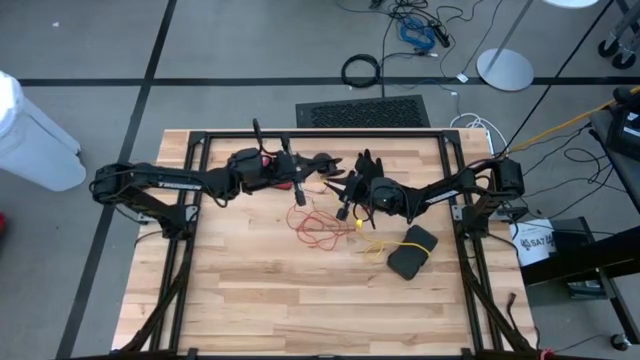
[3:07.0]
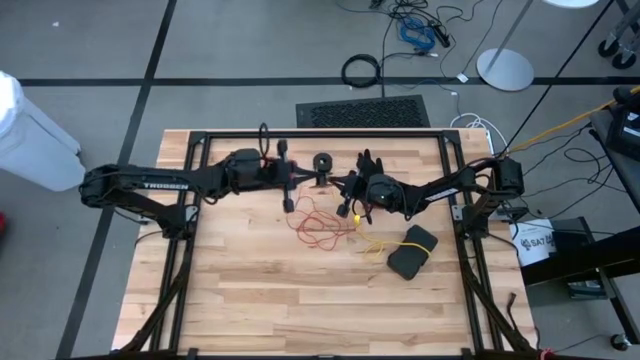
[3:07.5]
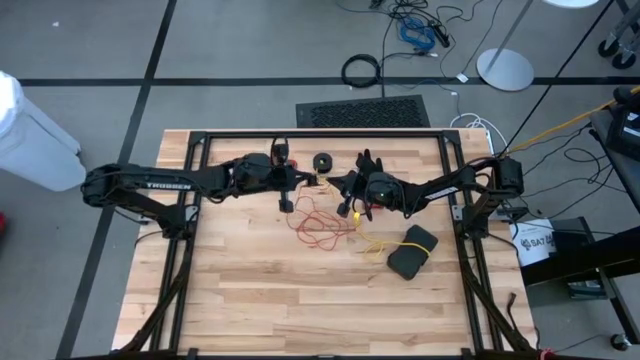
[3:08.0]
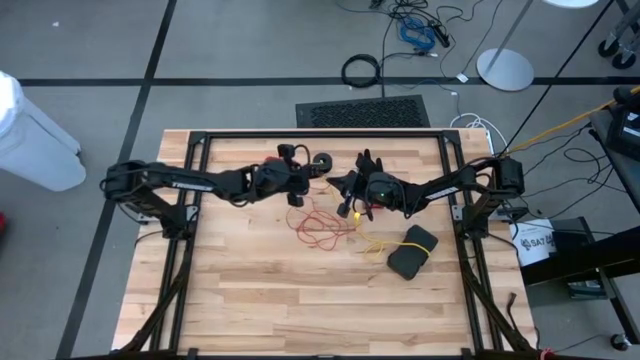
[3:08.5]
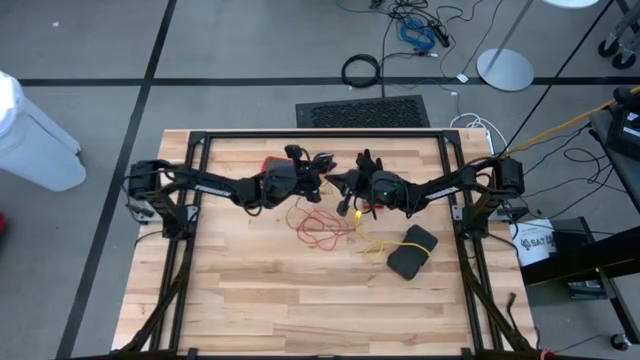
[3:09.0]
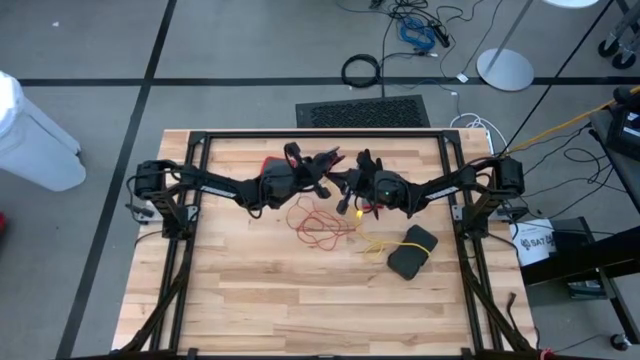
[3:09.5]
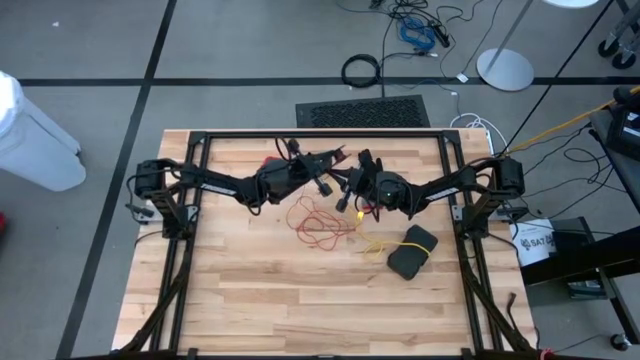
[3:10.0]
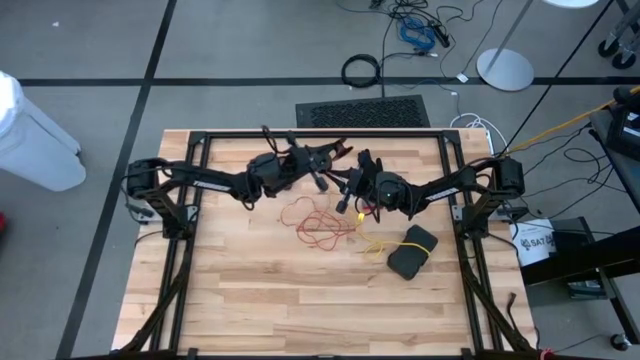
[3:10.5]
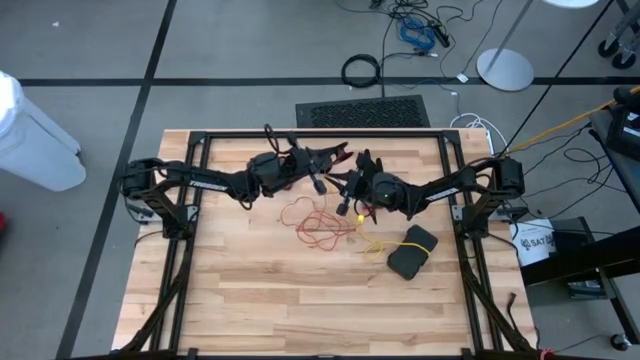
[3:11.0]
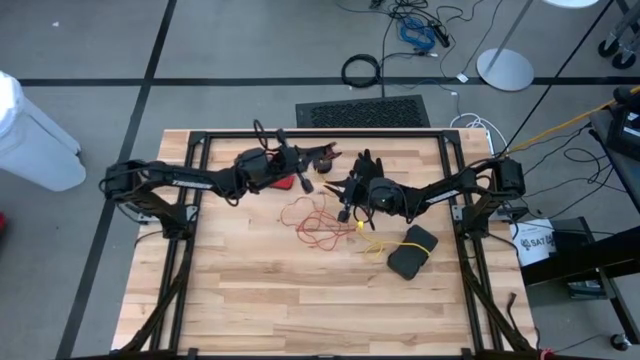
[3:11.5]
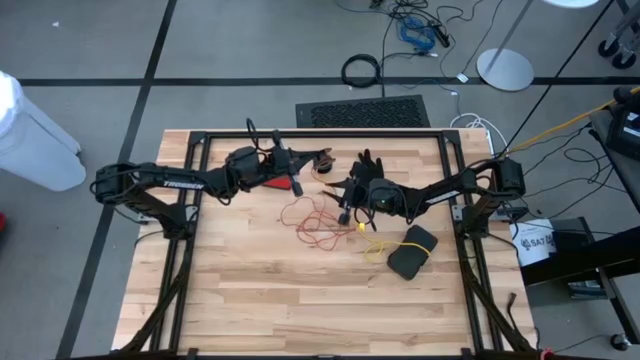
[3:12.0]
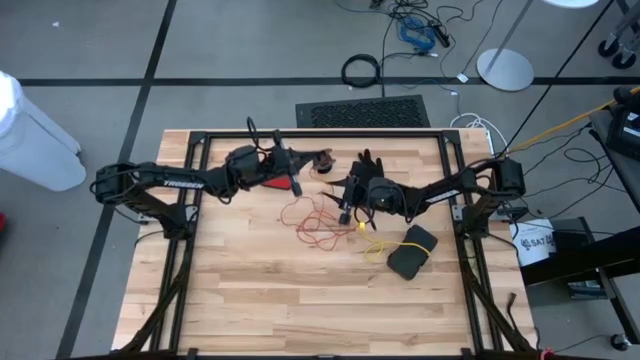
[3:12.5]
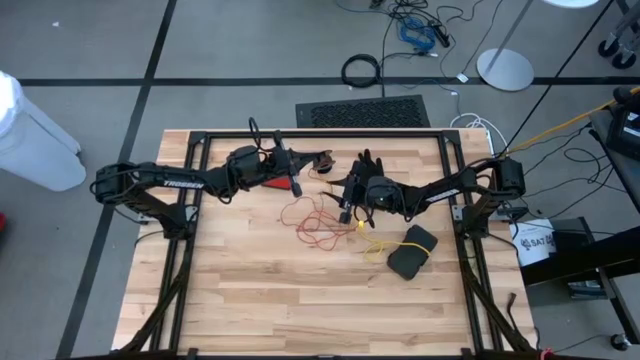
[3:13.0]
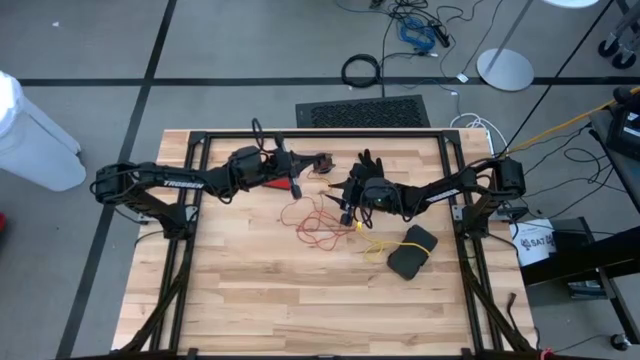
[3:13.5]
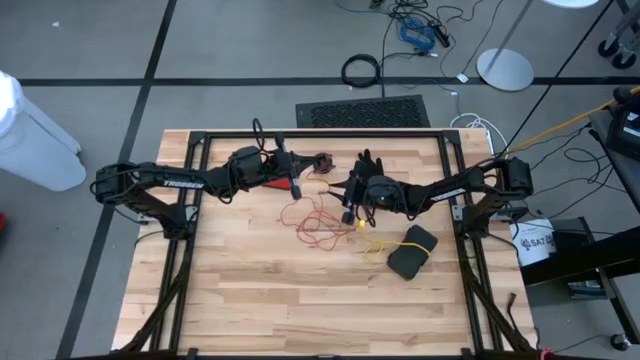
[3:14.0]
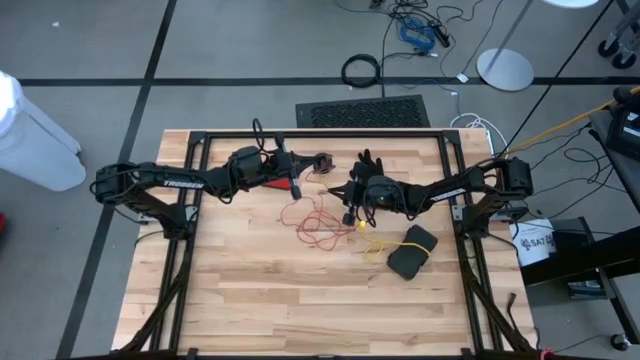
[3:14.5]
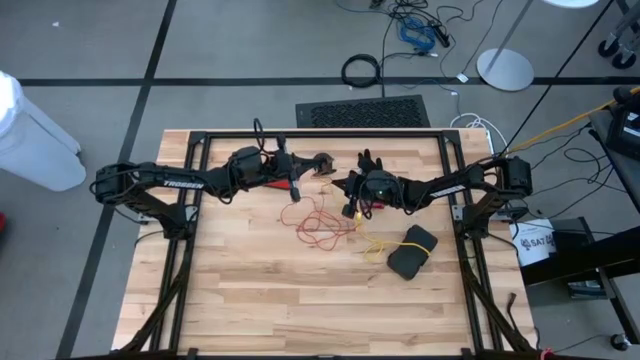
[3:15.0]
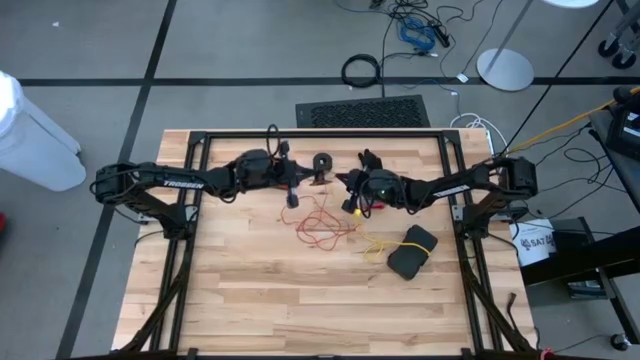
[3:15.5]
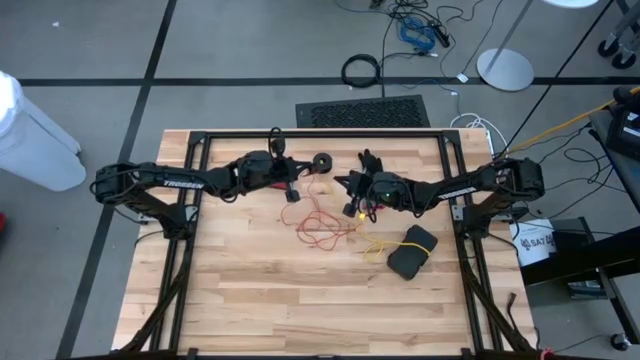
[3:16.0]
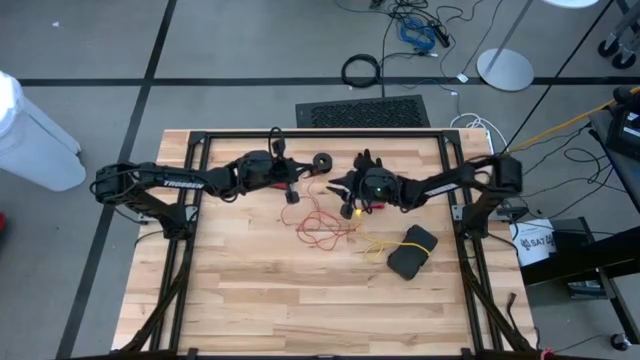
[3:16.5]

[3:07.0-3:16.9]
Task: Coil cords
Coil the red wire onto spool

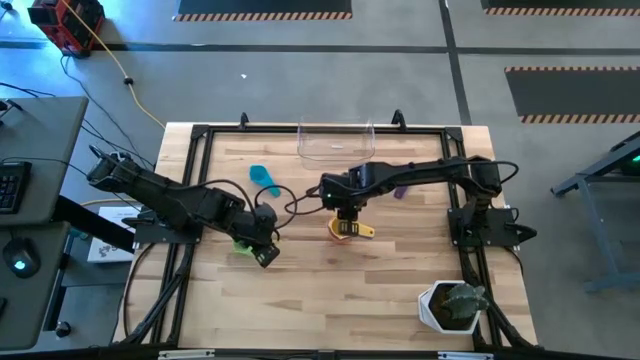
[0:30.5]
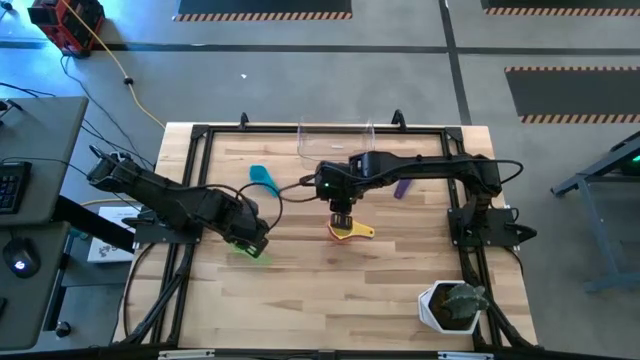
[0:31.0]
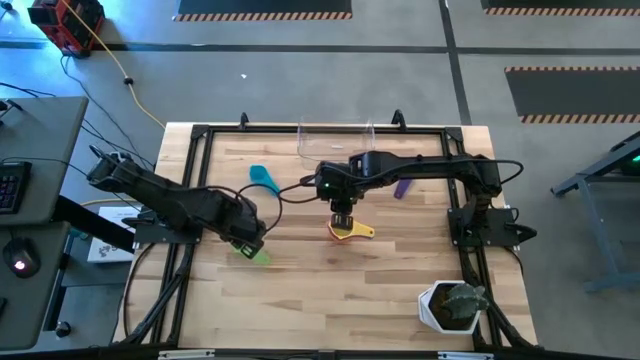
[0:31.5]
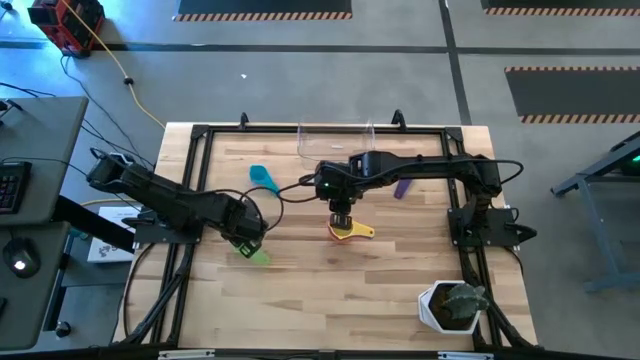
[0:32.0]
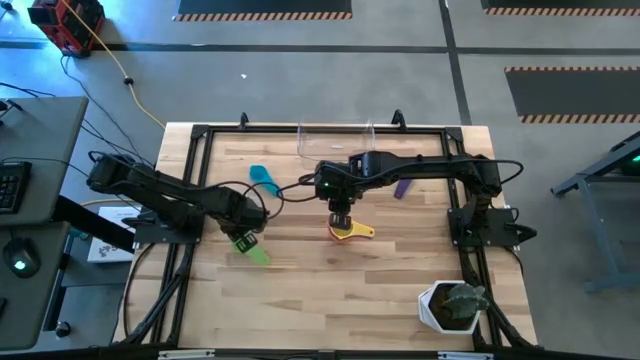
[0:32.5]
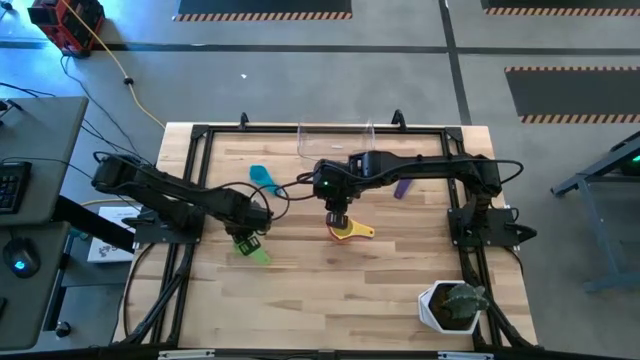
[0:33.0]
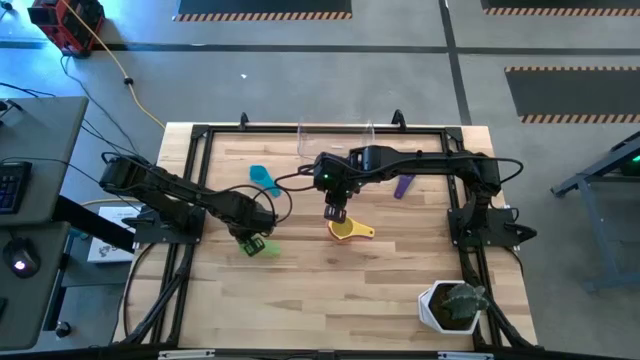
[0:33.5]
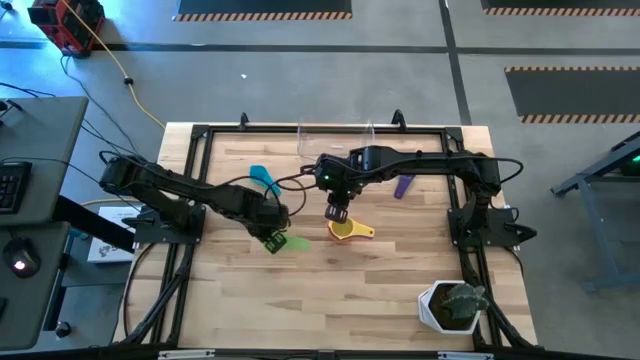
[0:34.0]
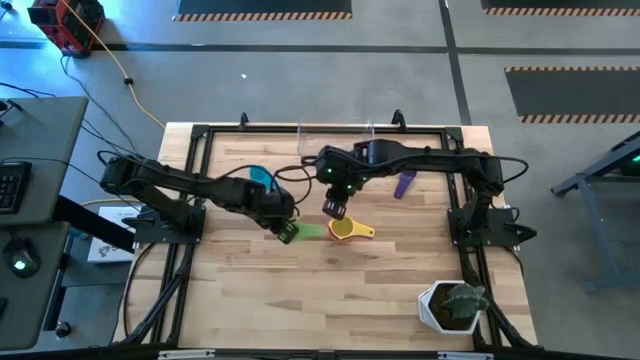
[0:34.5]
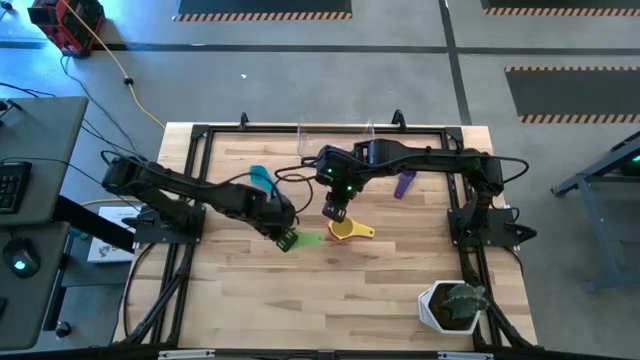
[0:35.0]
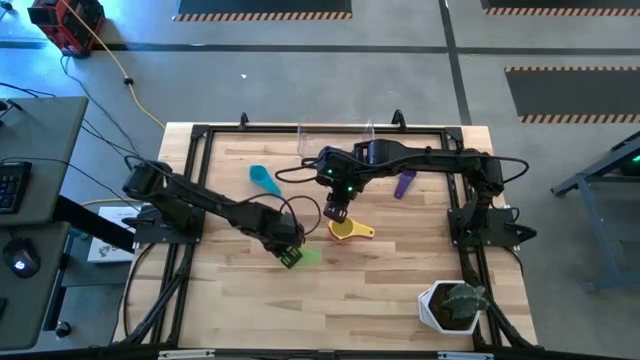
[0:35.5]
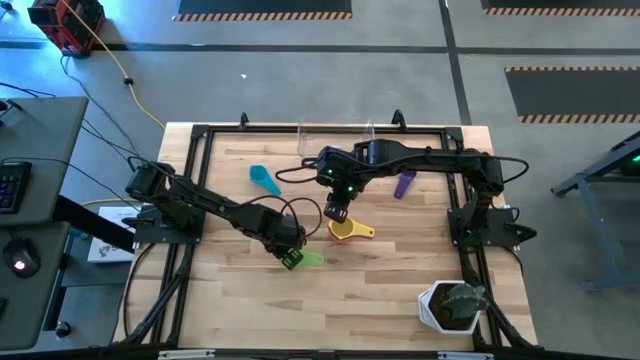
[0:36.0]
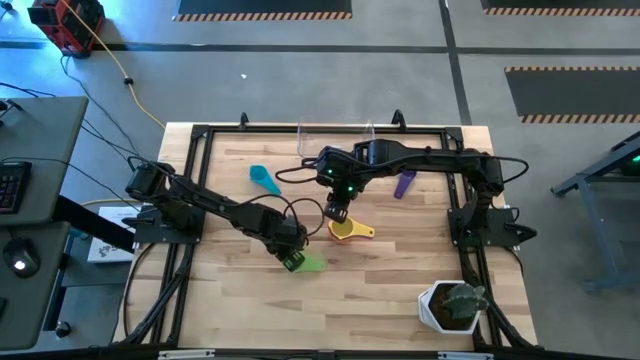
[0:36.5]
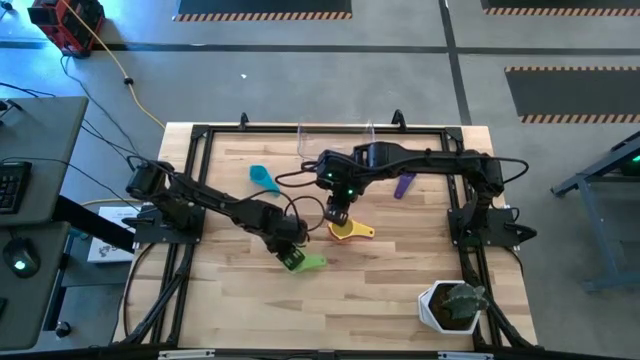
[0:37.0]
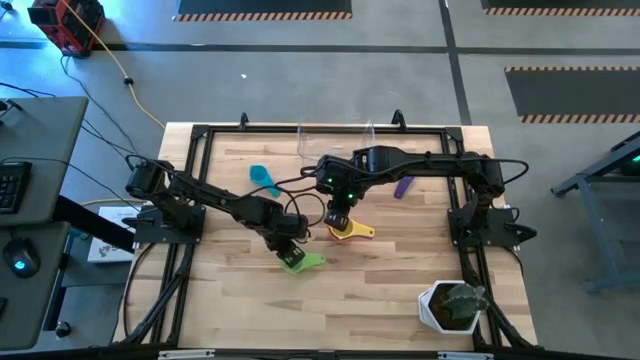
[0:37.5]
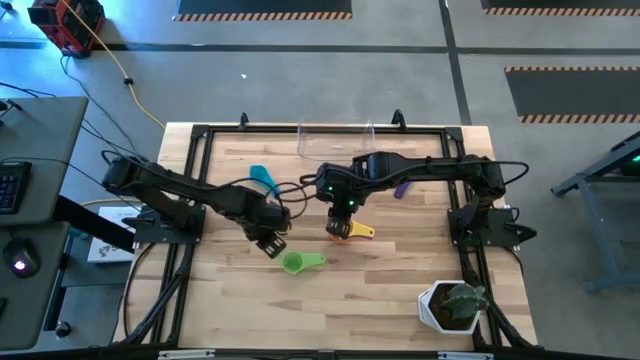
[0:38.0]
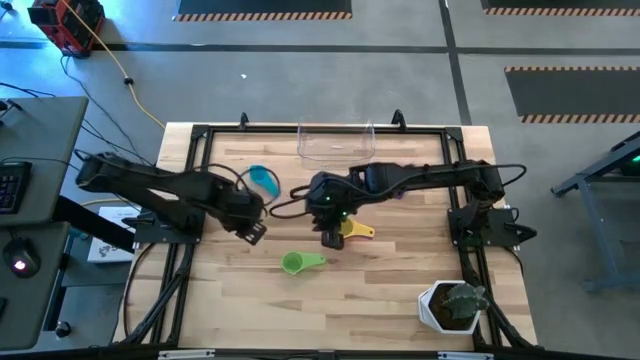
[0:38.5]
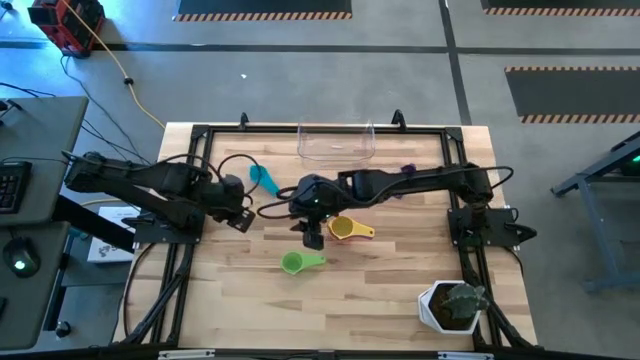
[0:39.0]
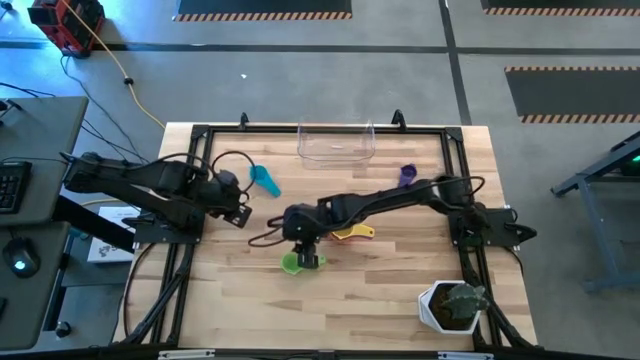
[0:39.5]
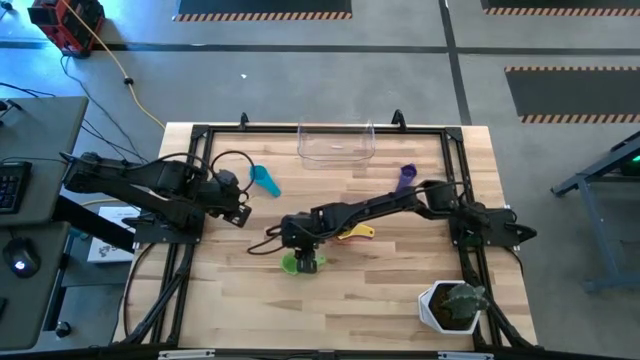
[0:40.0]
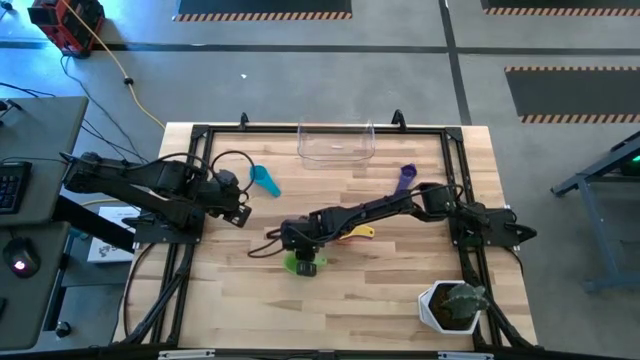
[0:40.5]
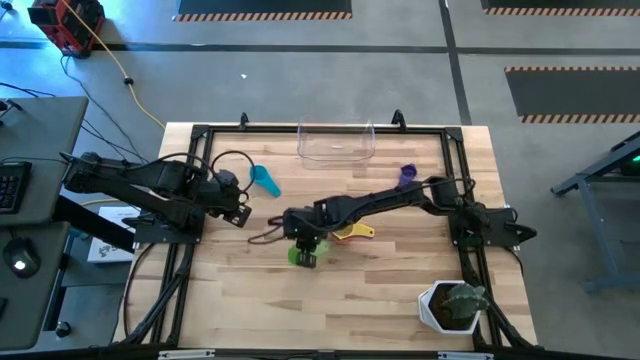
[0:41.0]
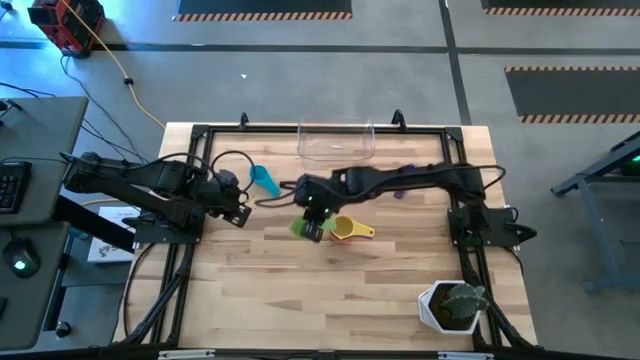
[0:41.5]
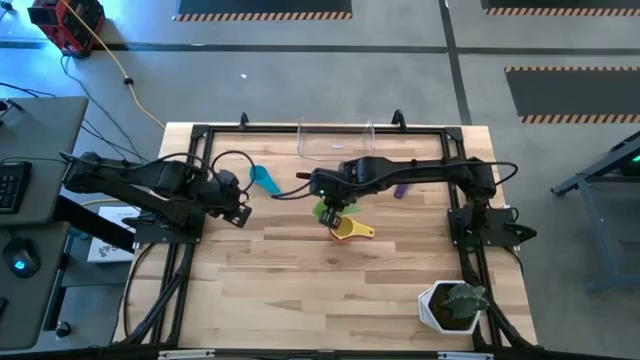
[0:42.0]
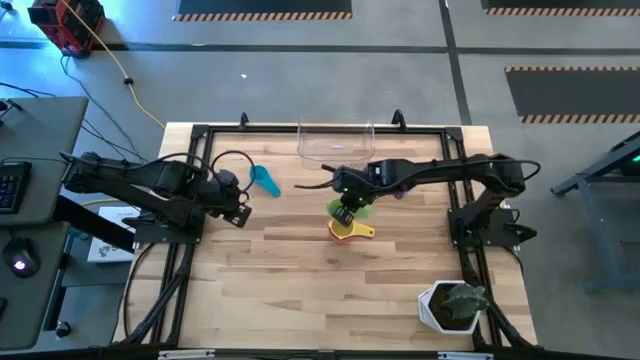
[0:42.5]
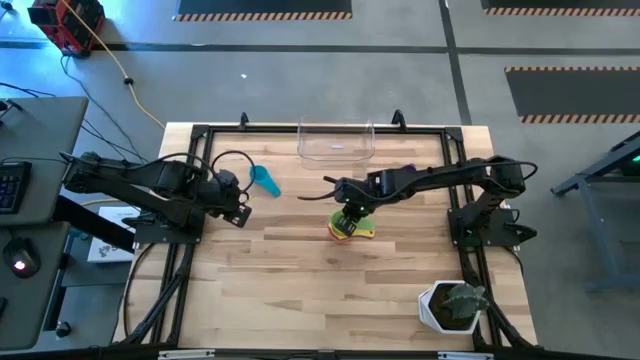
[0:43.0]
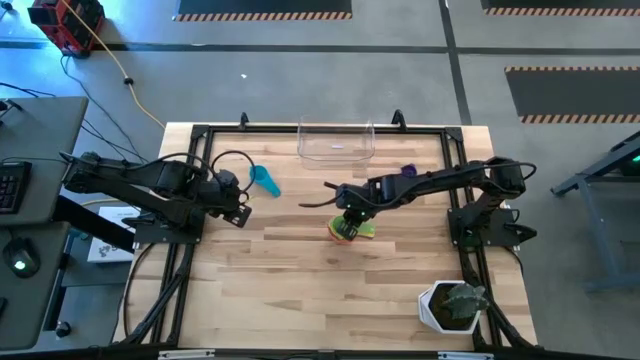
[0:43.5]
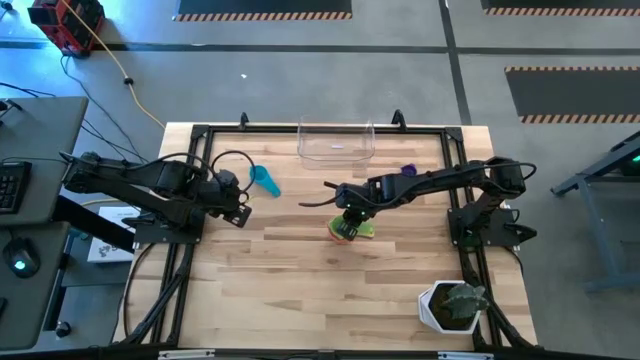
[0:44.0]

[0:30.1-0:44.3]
Task: Nest measuring cups in basket
Stack the green measuring cup on top of the yellow measuring cup
